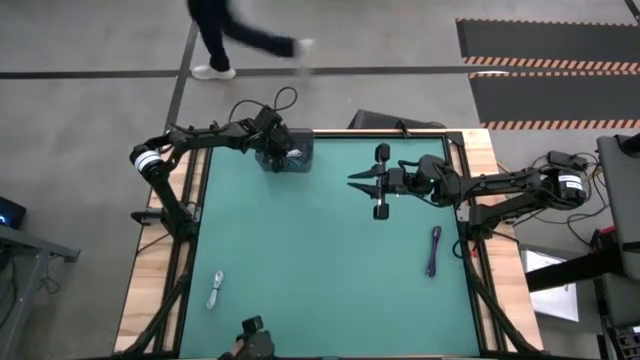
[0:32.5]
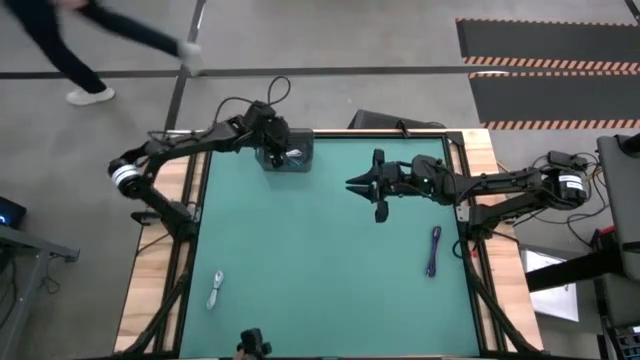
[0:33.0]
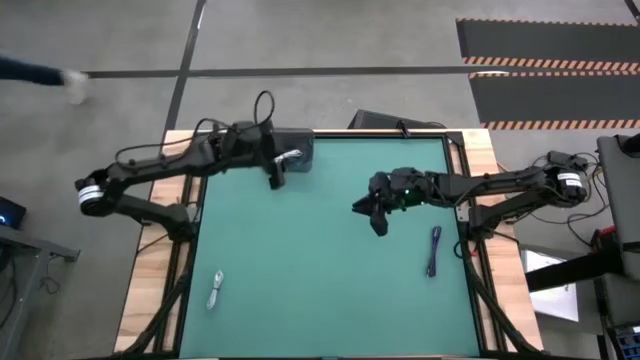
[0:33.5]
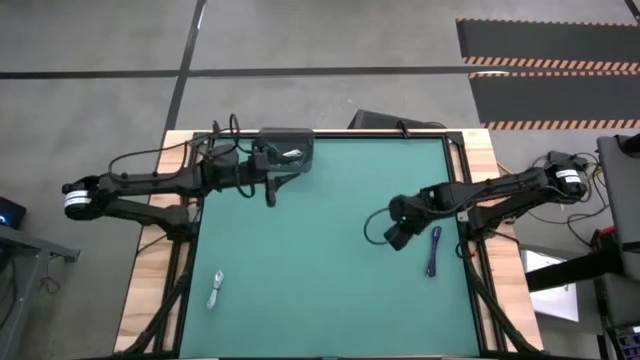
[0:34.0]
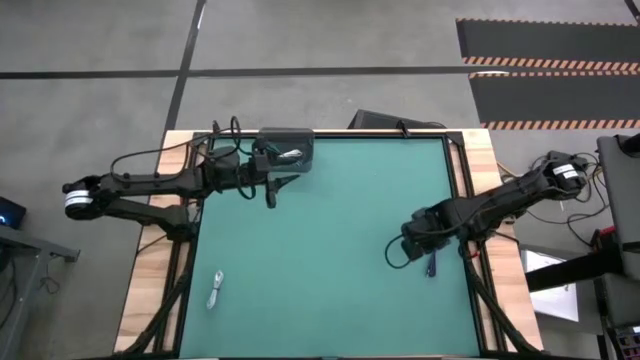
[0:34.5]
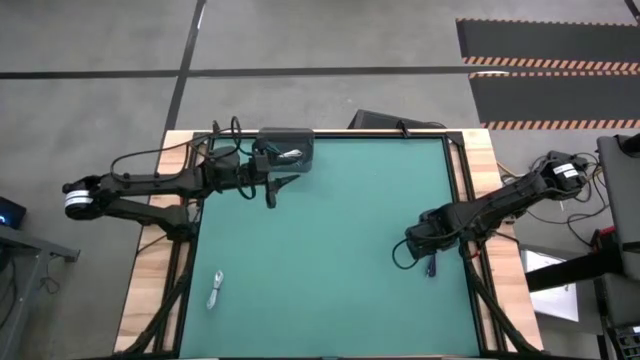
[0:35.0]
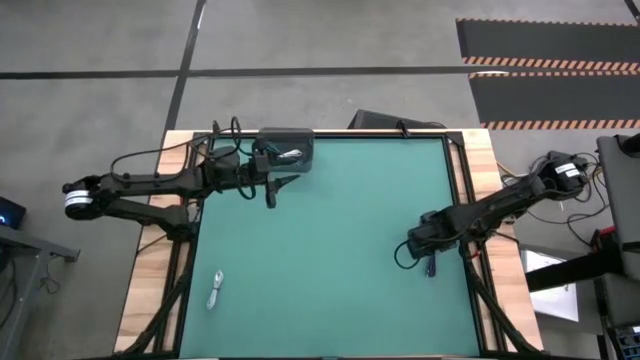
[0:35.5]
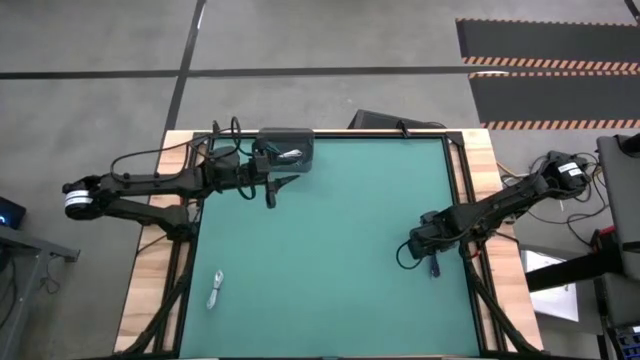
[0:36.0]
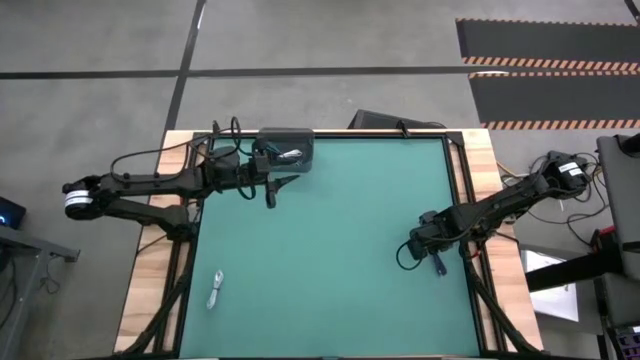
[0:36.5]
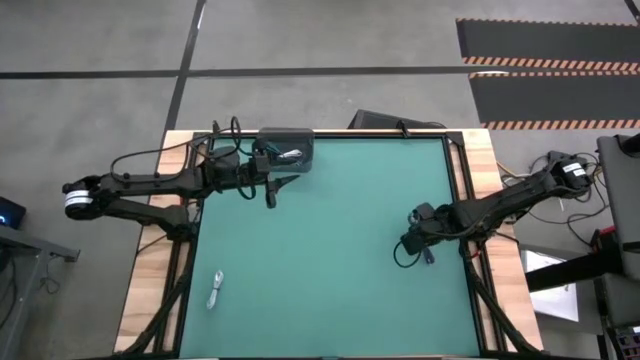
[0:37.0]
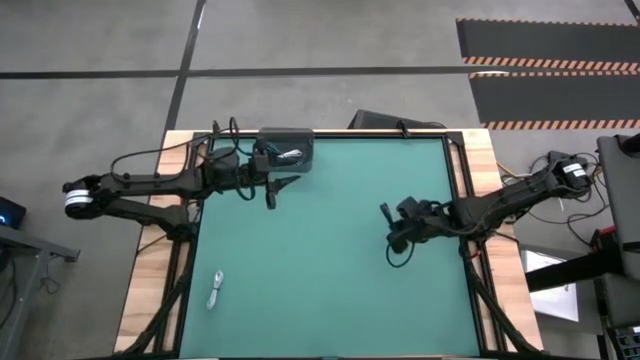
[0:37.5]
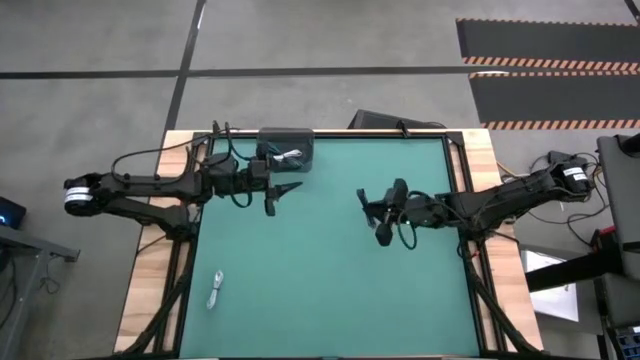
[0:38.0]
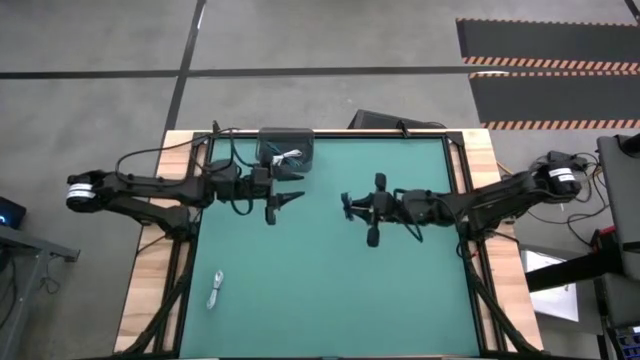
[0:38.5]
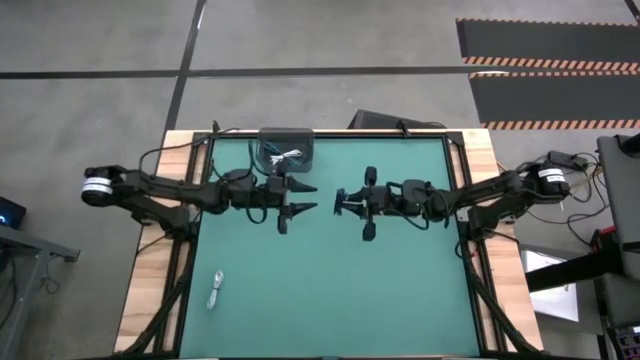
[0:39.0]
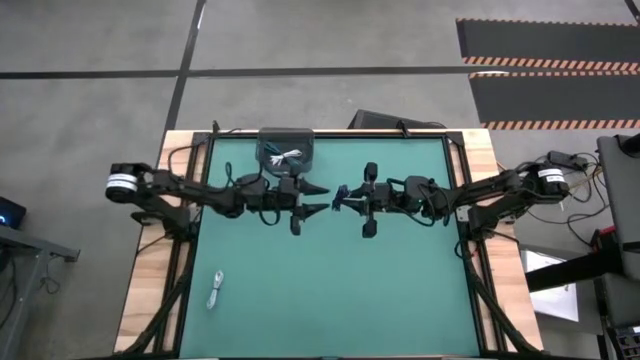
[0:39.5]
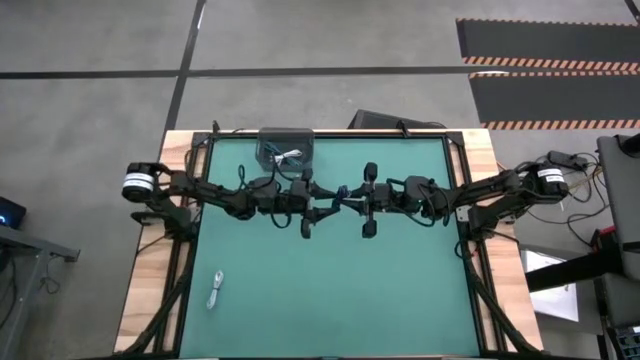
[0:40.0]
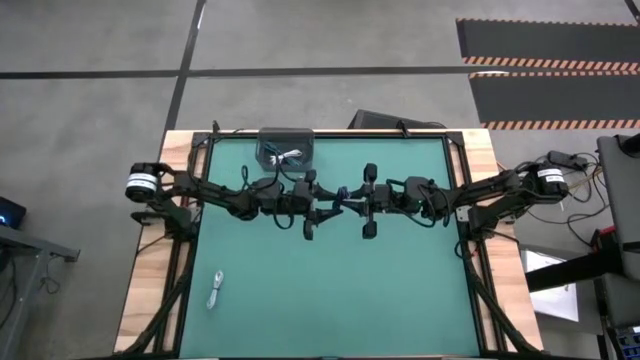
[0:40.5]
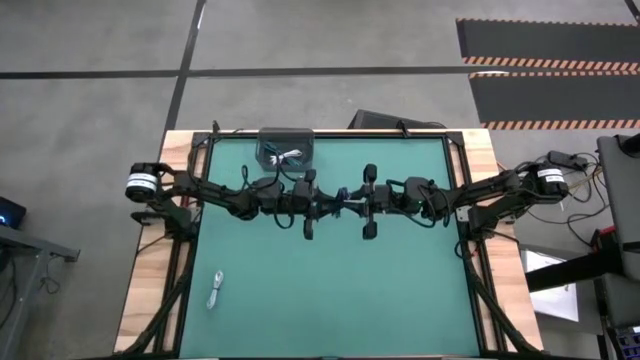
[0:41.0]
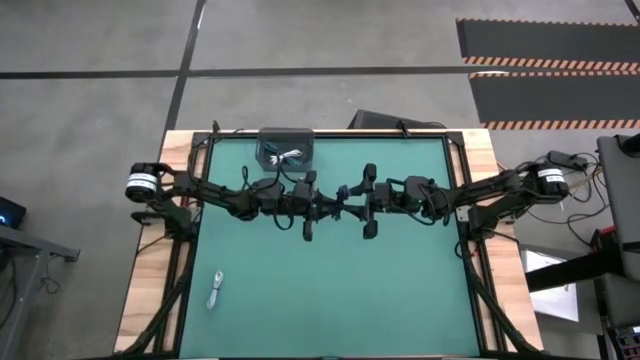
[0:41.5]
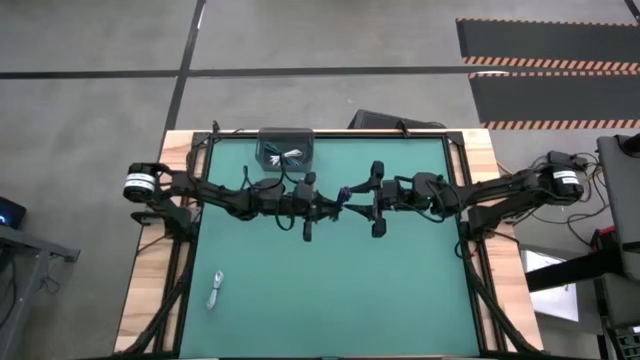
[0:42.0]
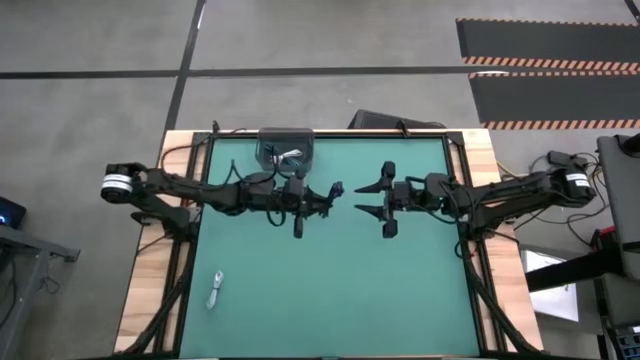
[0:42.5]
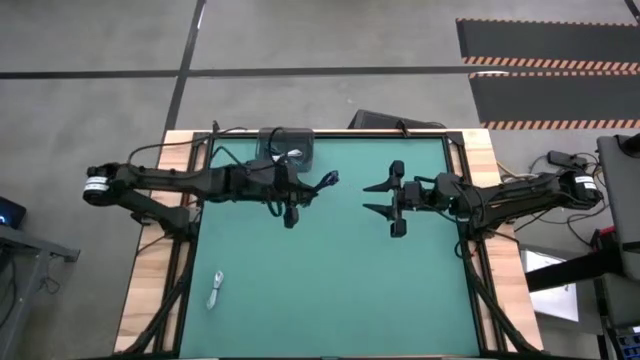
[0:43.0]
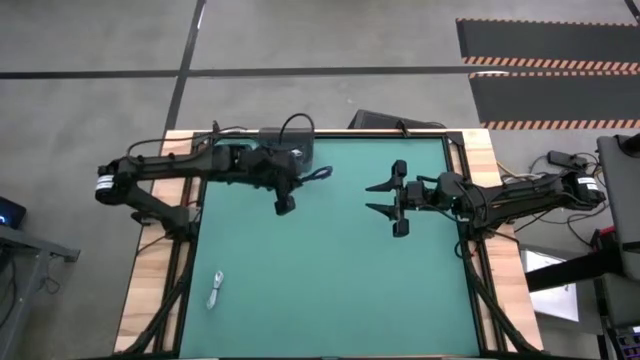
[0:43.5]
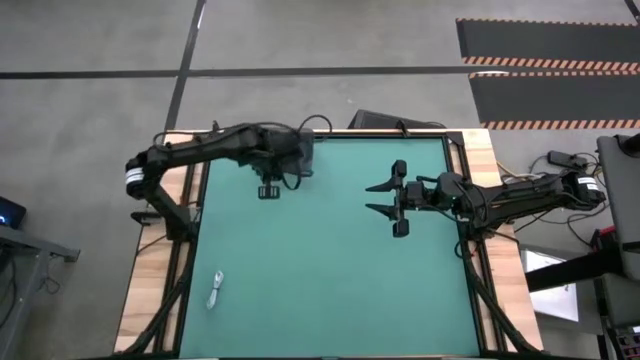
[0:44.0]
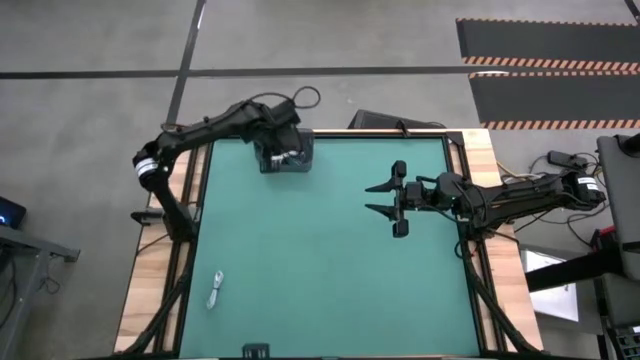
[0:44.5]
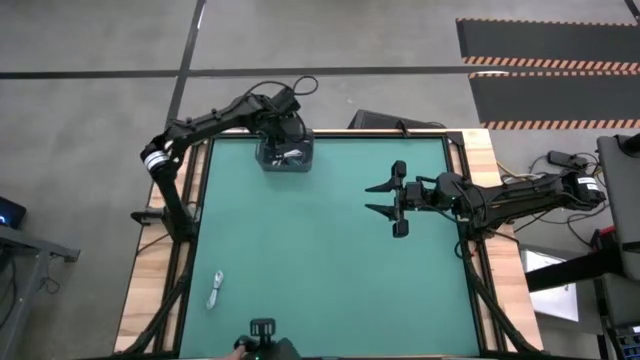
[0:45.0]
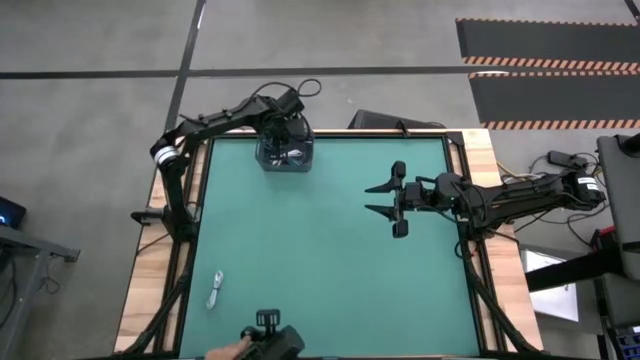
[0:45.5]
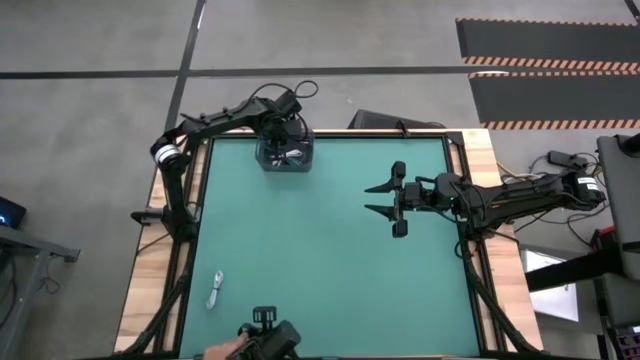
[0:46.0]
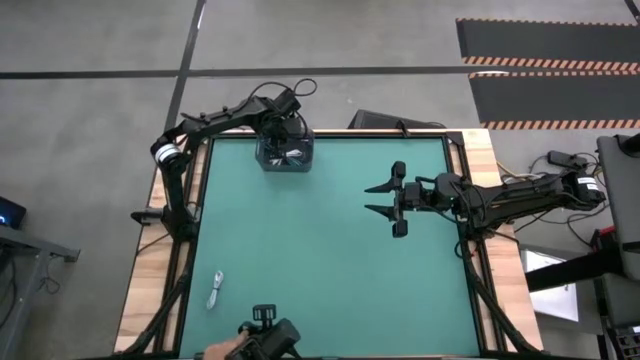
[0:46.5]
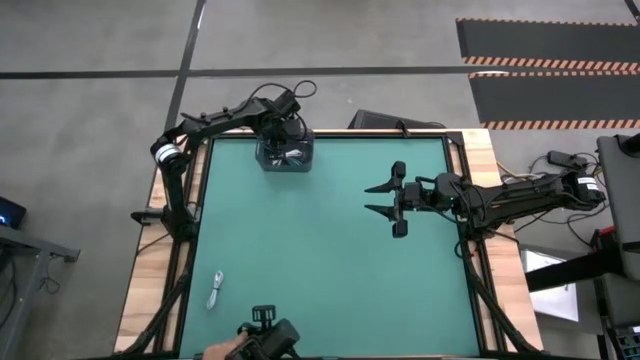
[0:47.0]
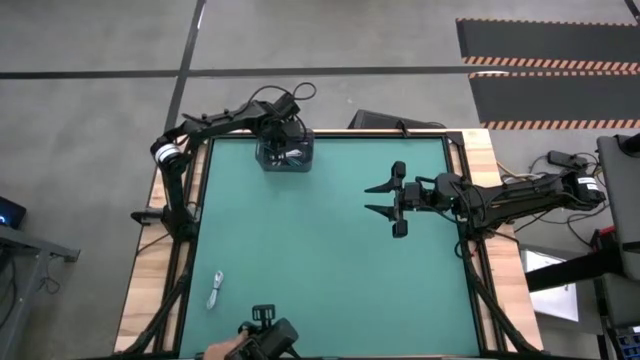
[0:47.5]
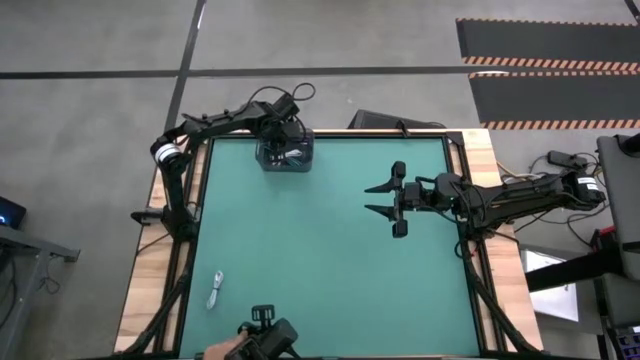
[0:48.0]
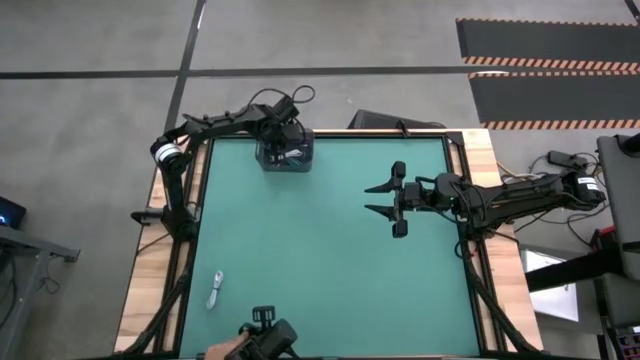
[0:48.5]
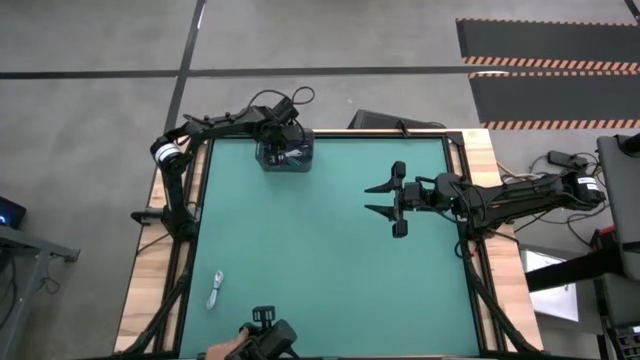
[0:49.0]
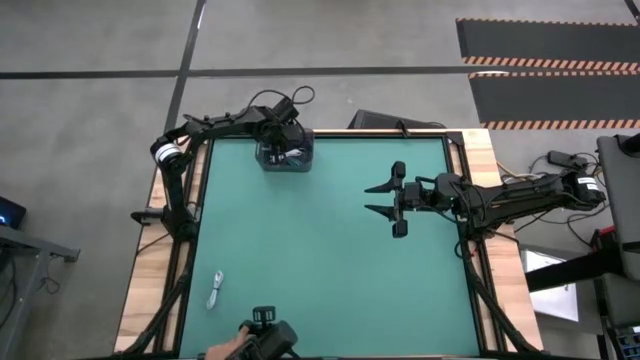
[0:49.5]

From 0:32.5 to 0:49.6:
Task: Pick and place USB-C Cables
Put the purple charger cable into the bin

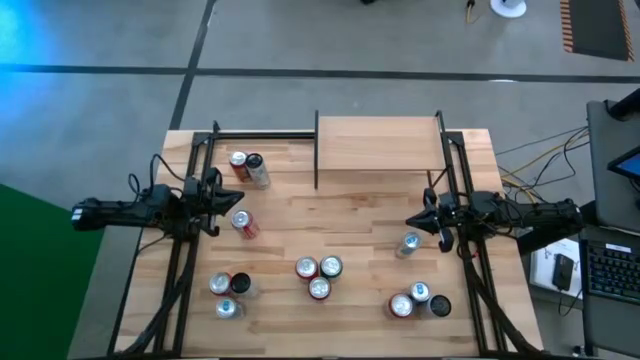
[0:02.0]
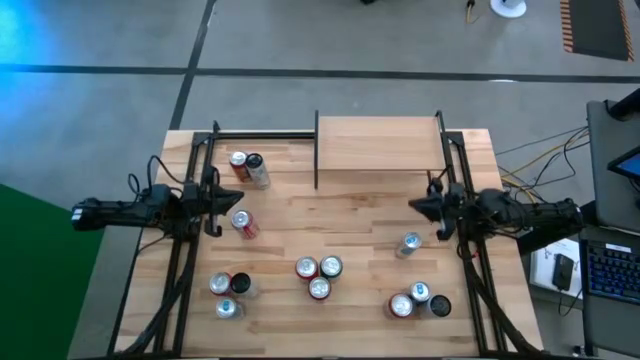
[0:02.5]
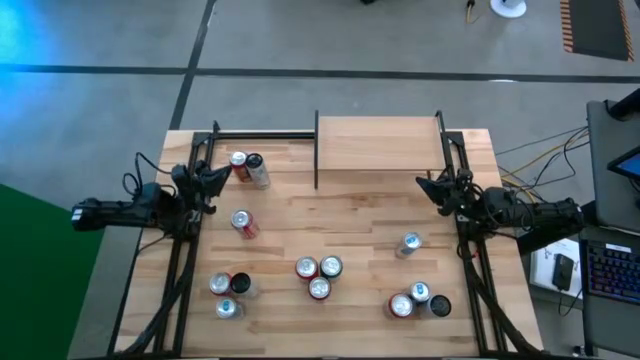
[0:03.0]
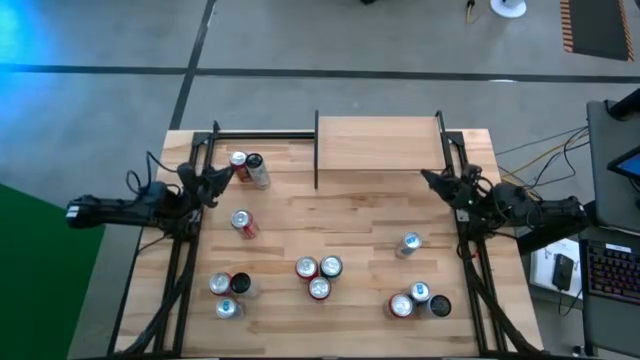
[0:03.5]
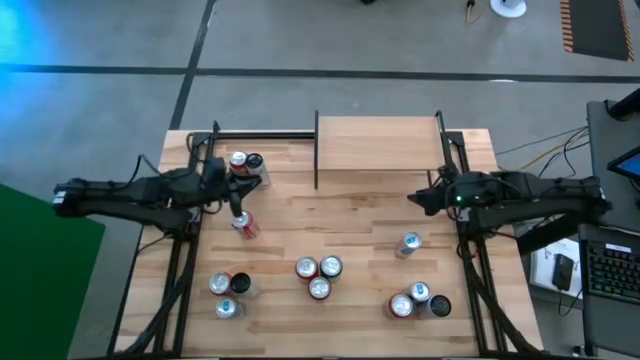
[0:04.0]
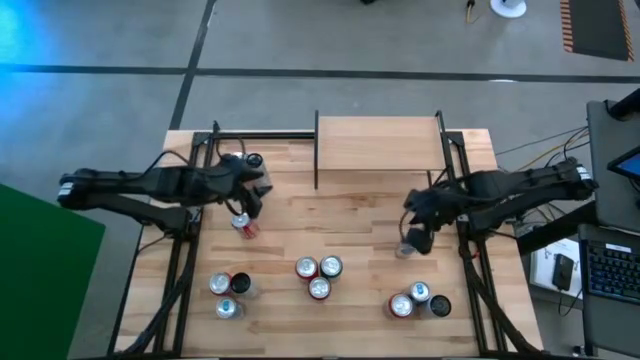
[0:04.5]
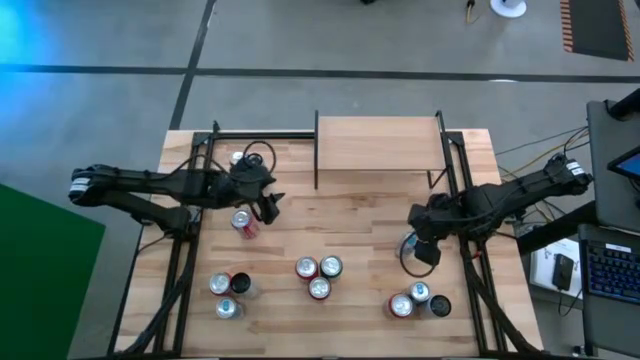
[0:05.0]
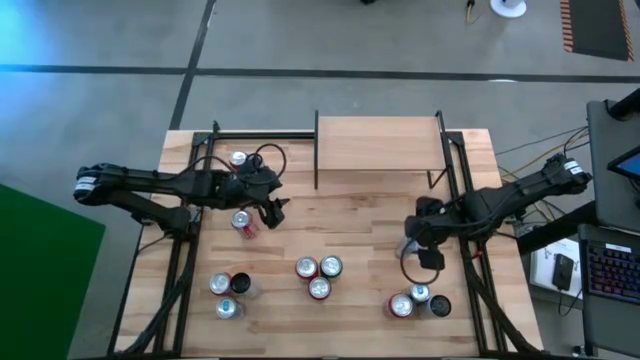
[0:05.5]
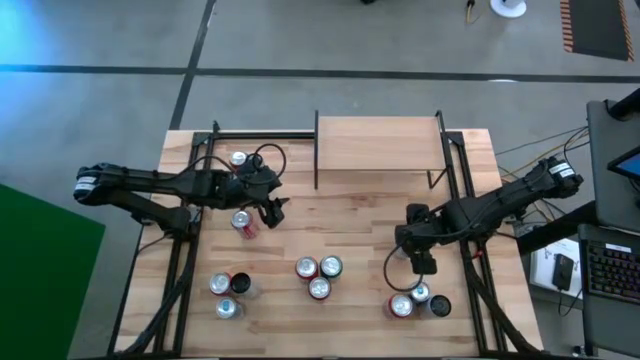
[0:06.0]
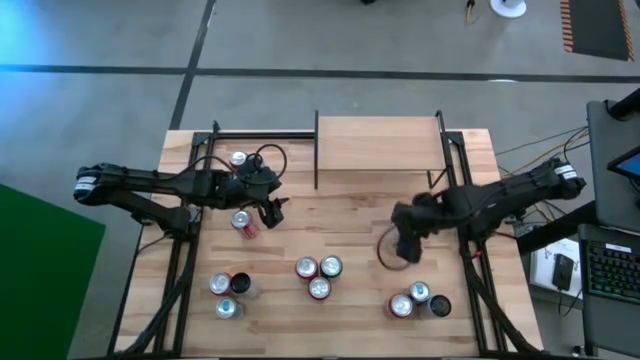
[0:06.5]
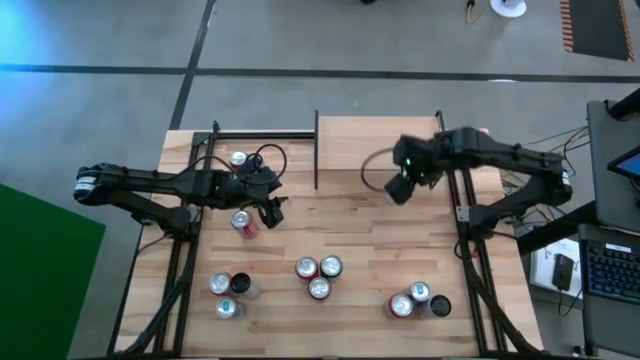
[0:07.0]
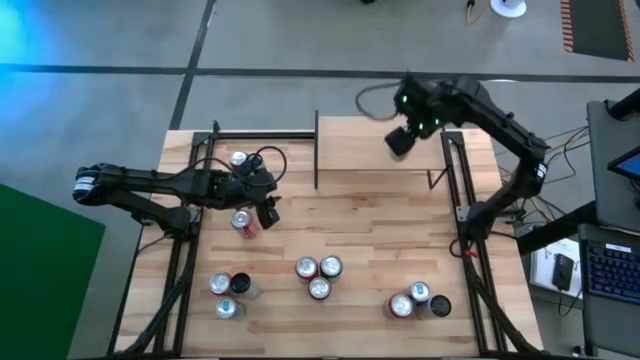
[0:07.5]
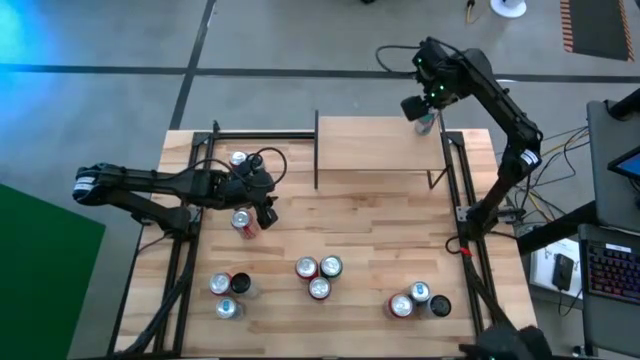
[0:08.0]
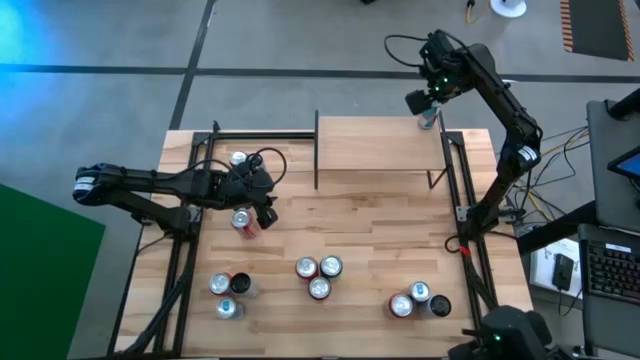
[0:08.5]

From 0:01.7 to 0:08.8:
Task: Place canned beverage on shelf
Put the top blue soda can on the shelf
